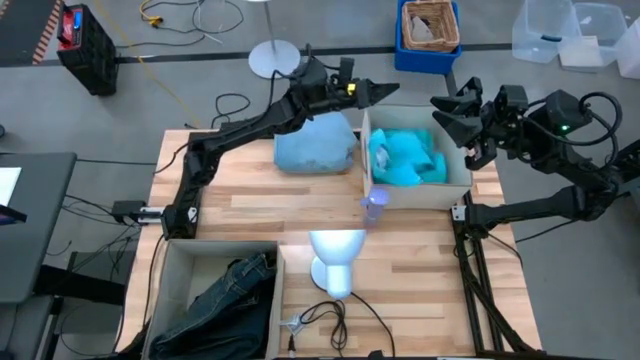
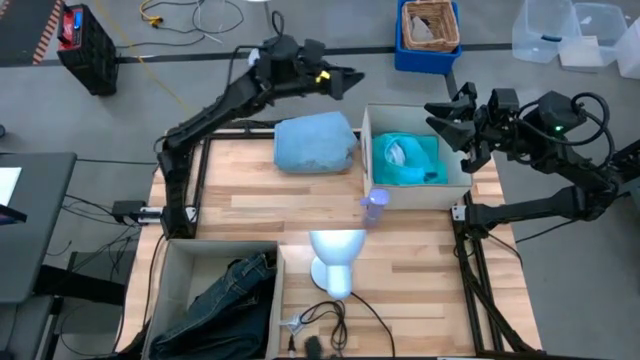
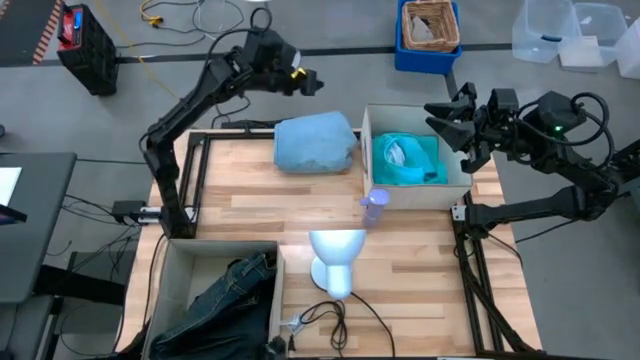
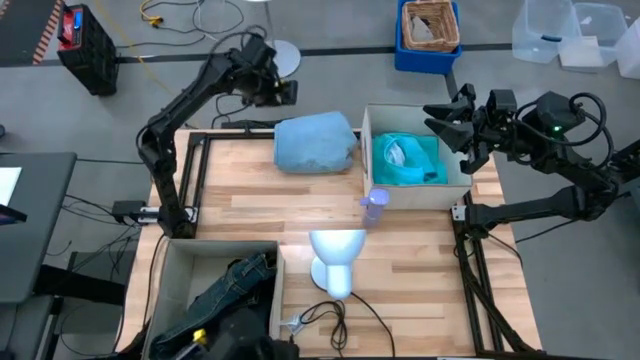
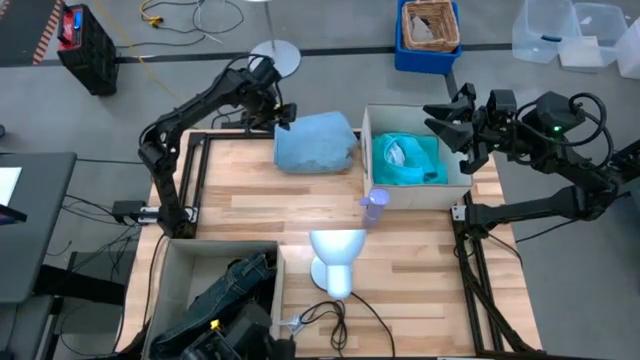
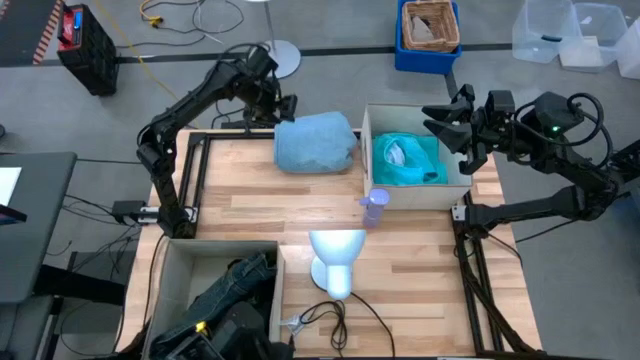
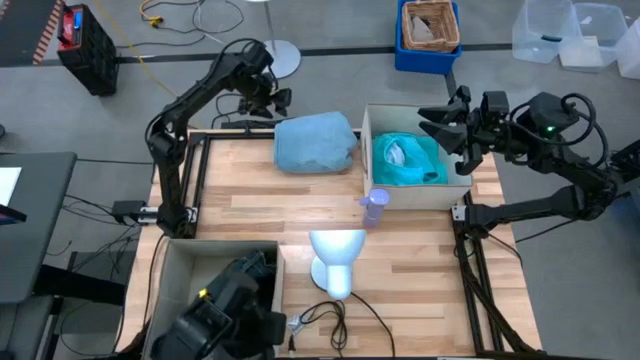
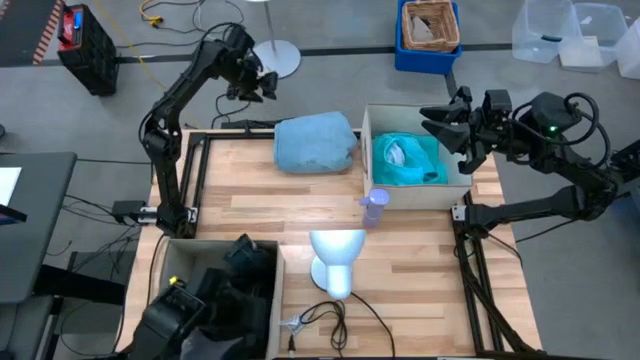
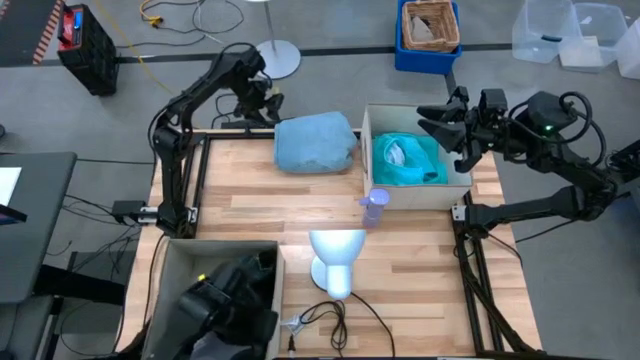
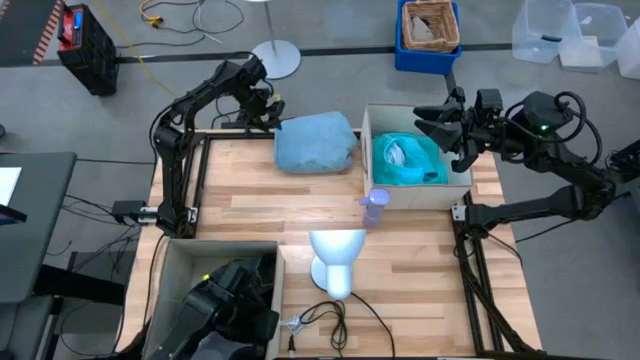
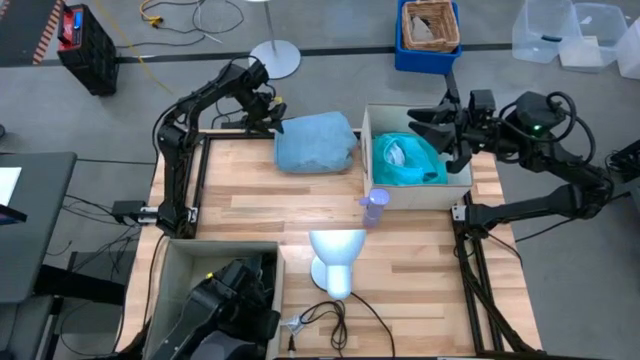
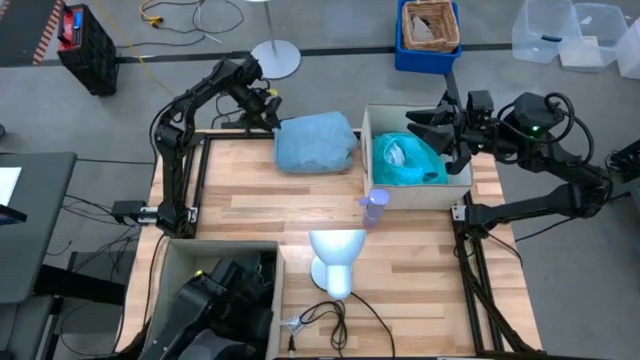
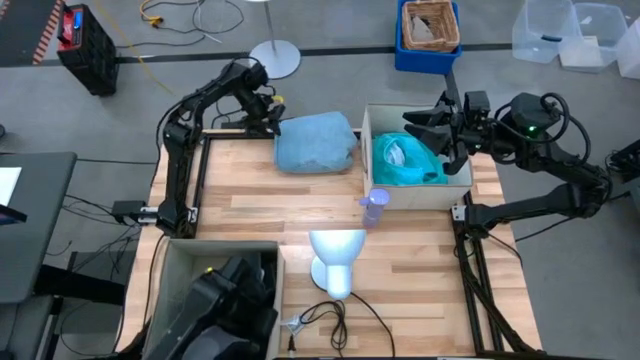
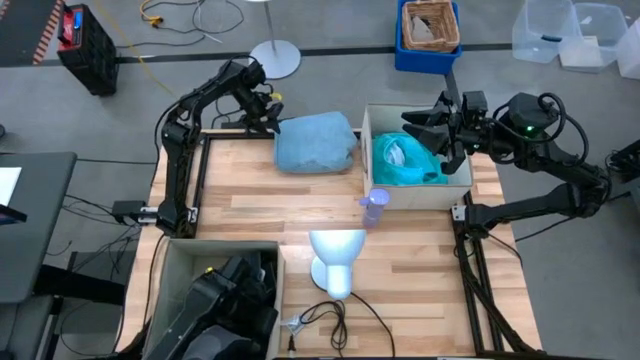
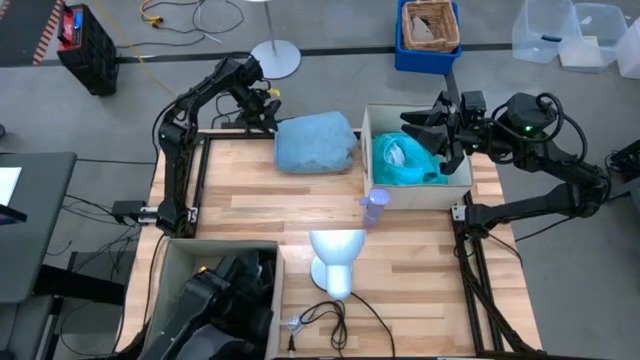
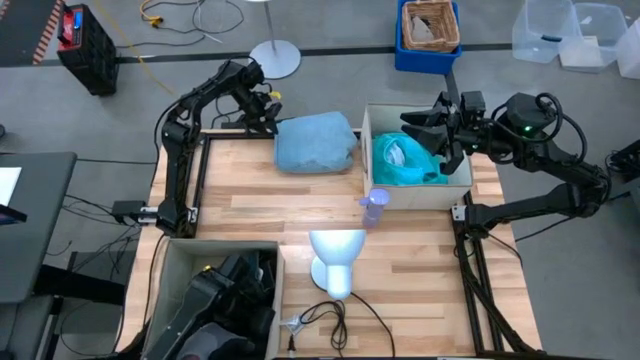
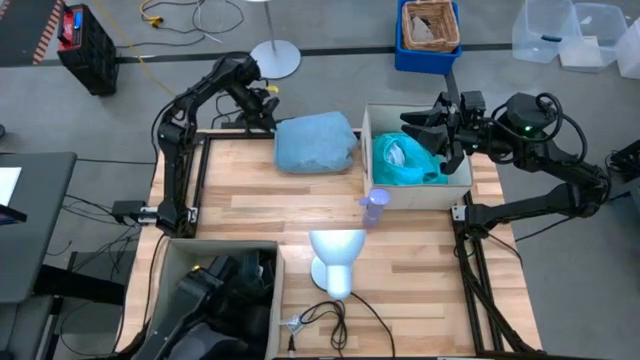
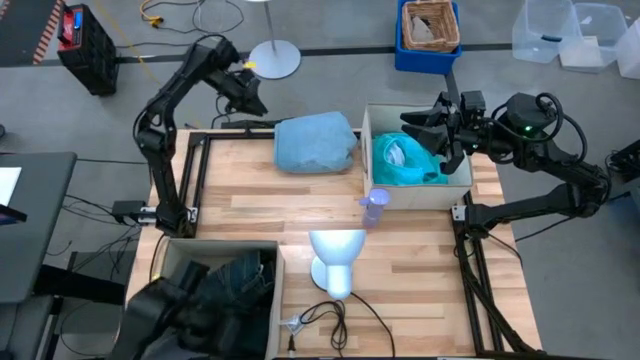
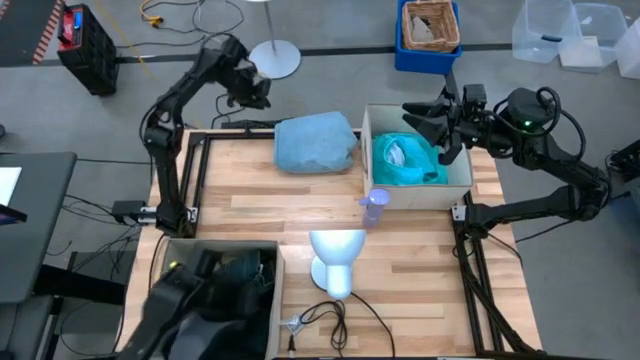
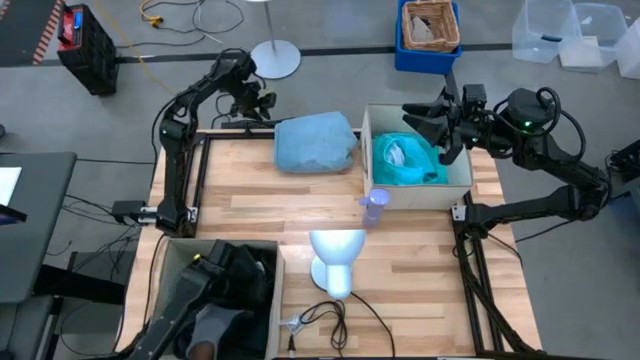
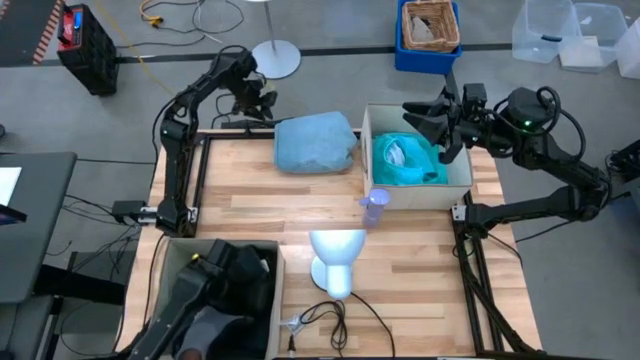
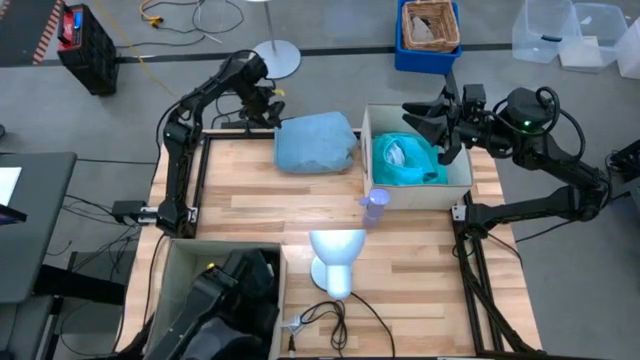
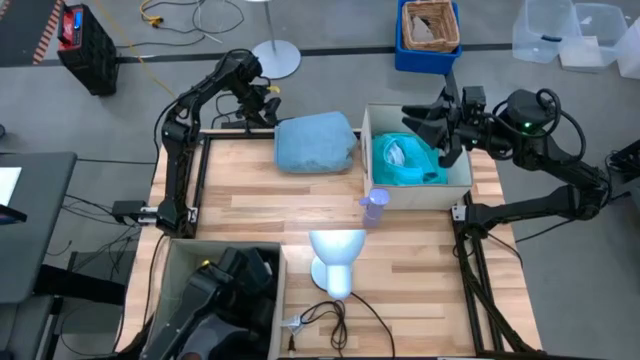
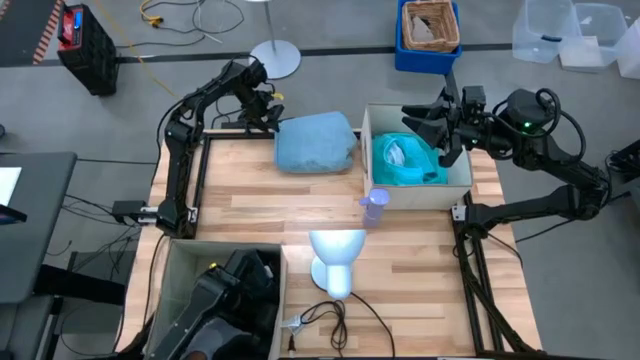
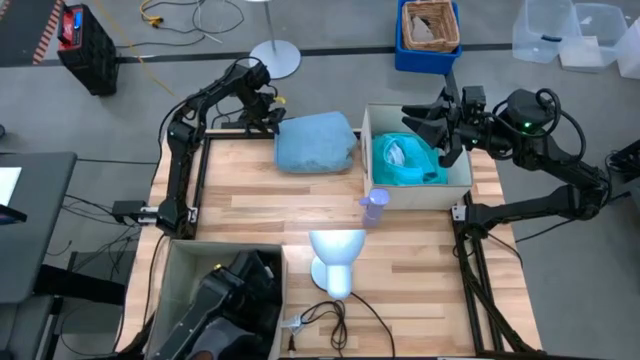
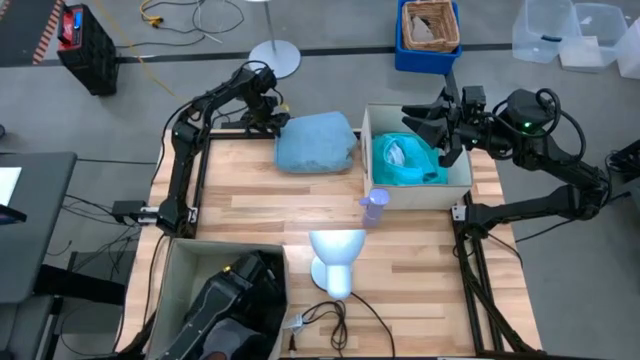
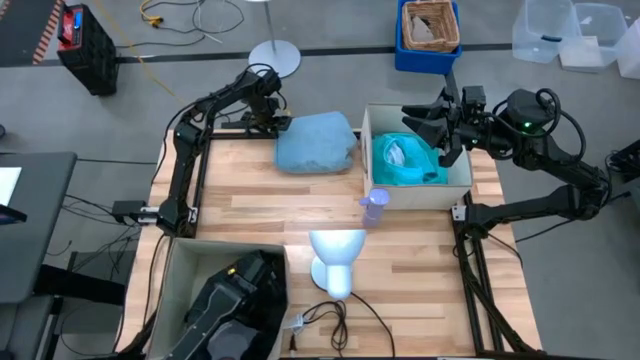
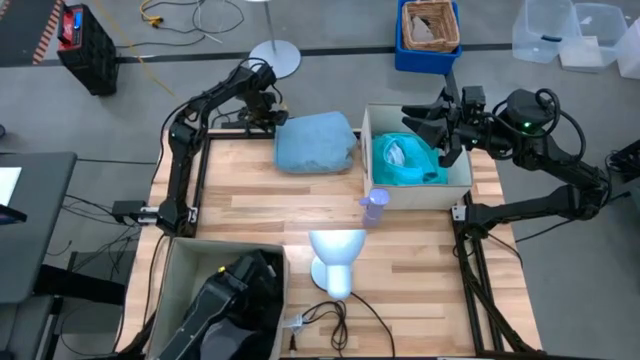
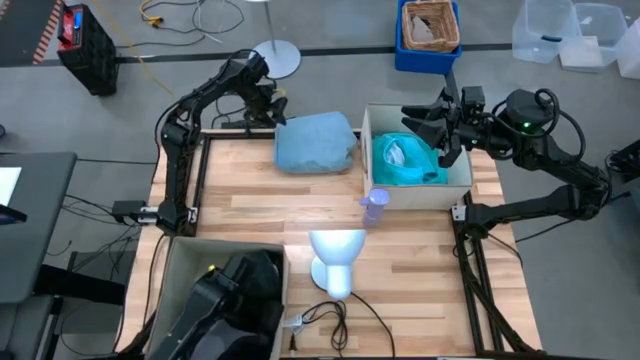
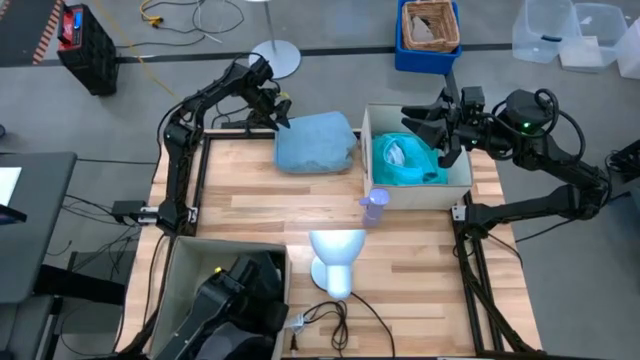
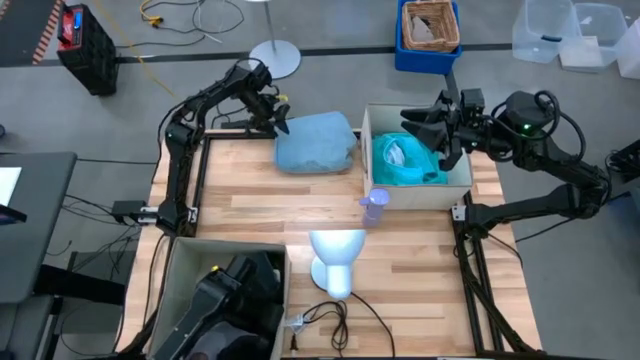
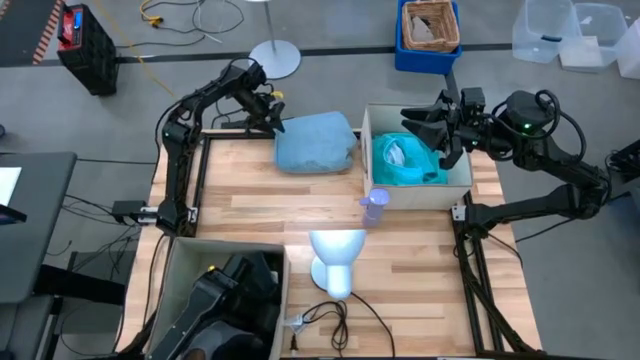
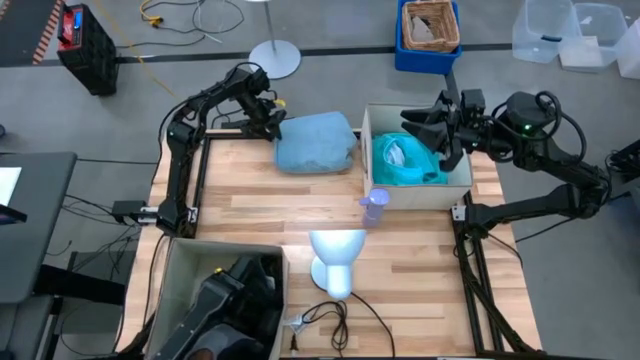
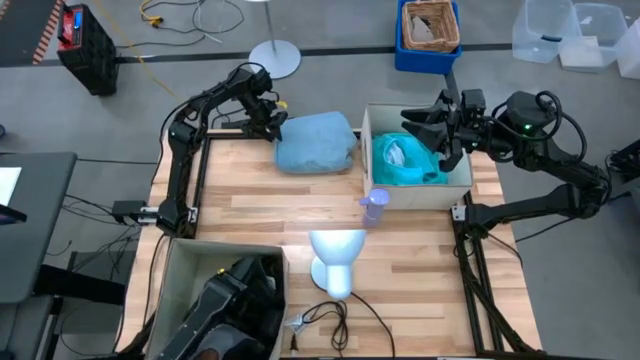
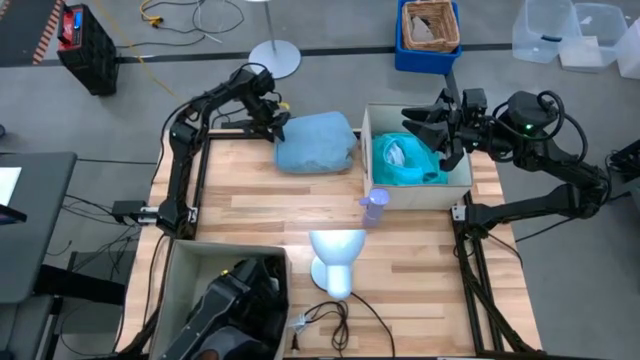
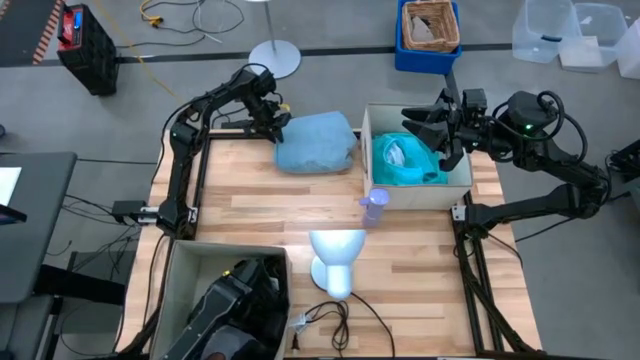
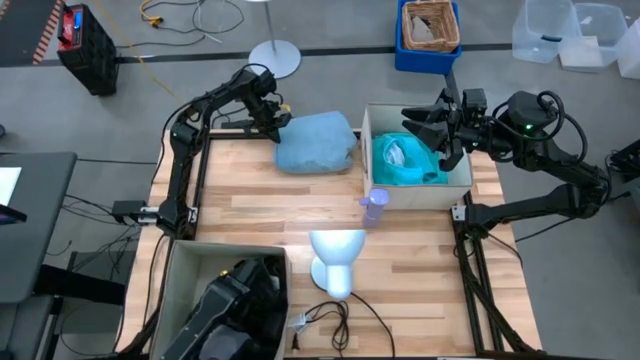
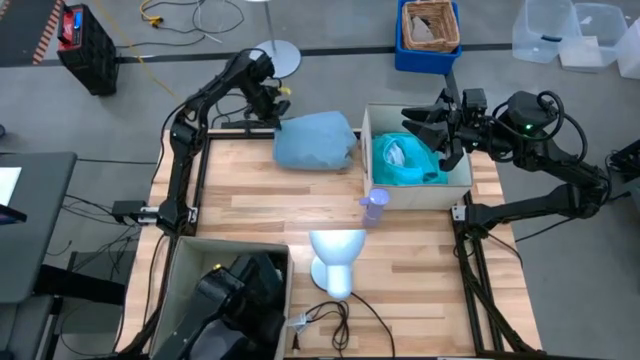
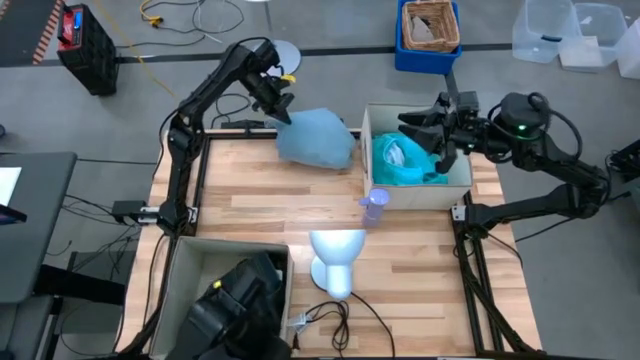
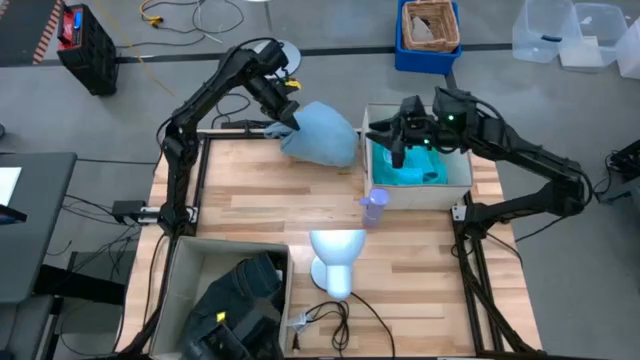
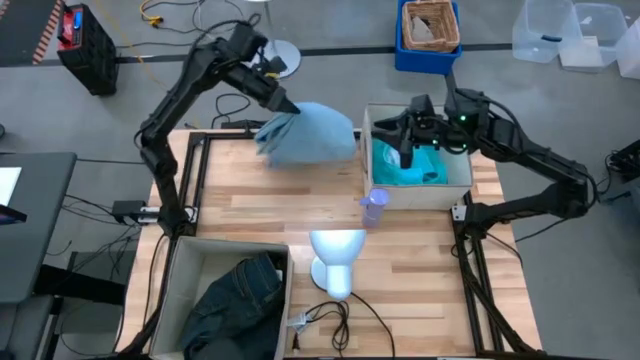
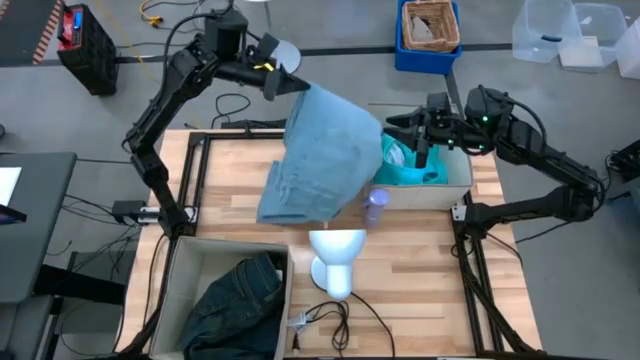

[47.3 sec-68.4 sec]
Task: Sort clothes
Put the light blue jeans into the top laundry organizer
